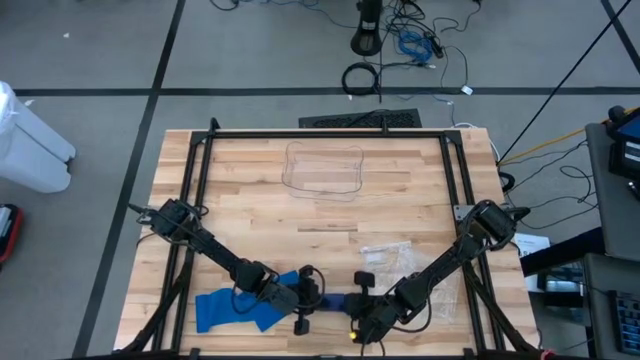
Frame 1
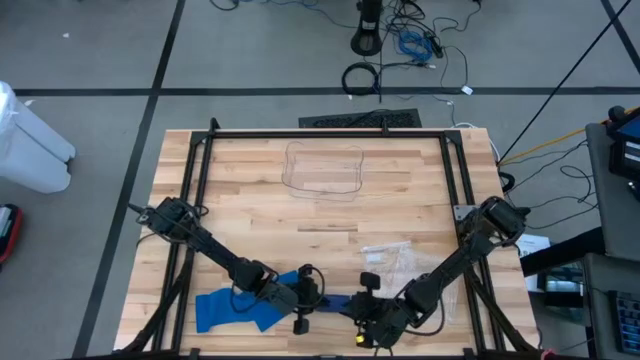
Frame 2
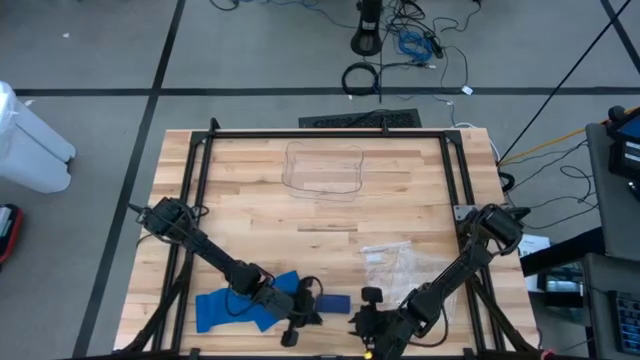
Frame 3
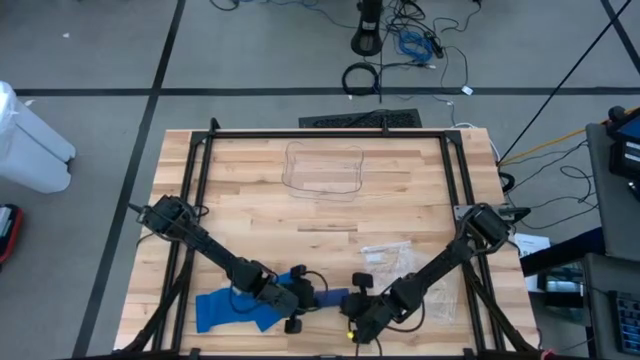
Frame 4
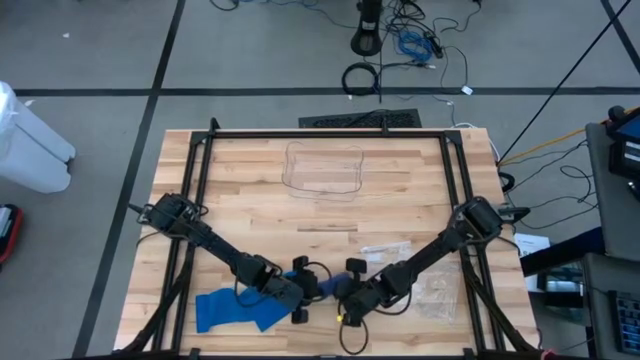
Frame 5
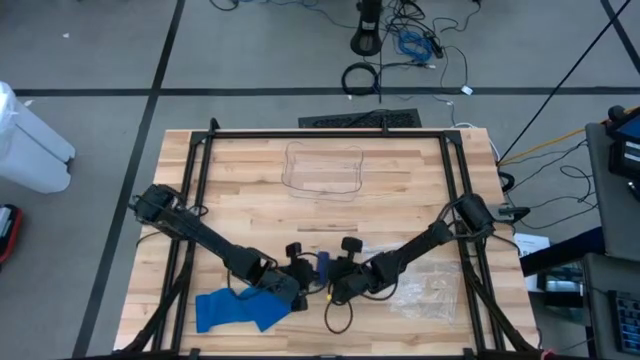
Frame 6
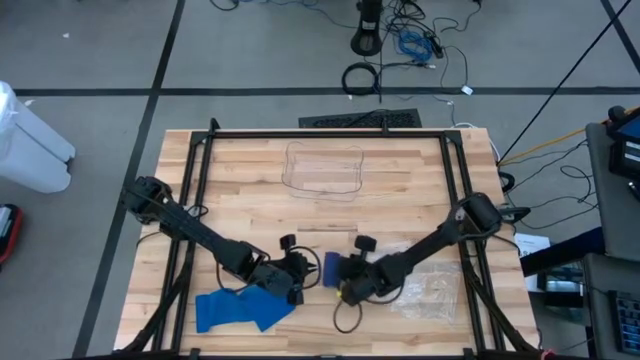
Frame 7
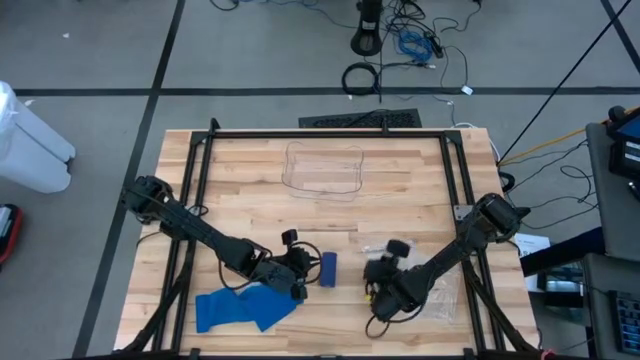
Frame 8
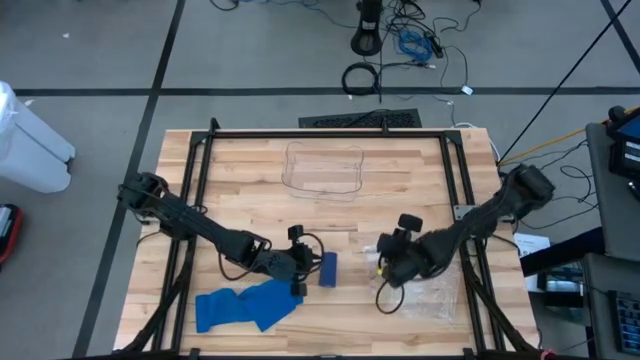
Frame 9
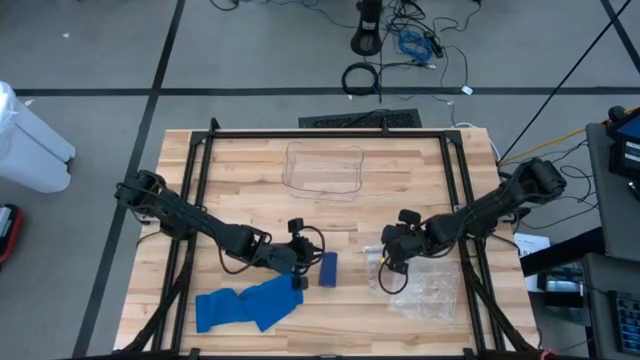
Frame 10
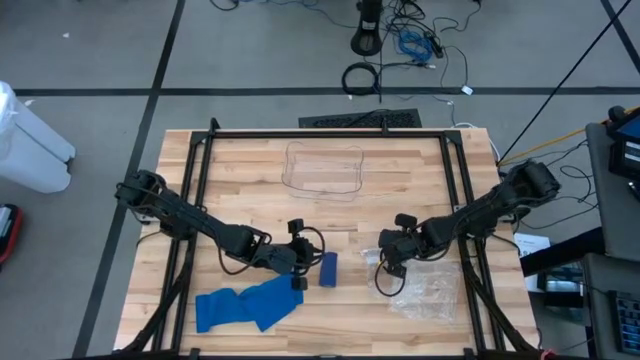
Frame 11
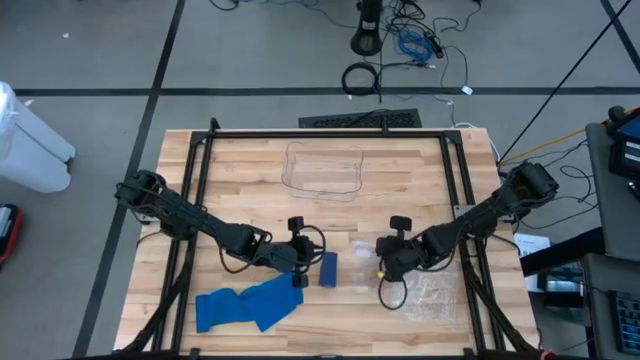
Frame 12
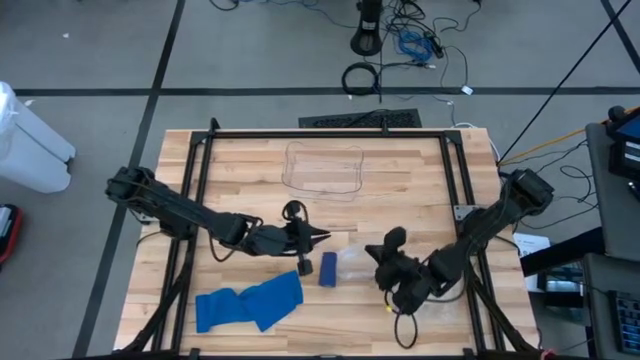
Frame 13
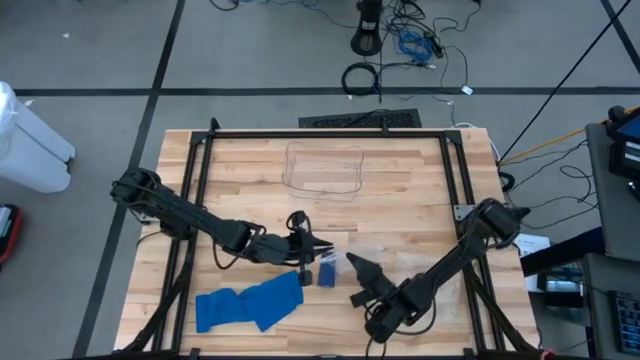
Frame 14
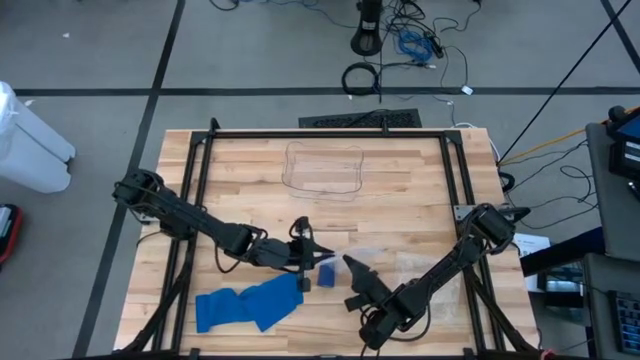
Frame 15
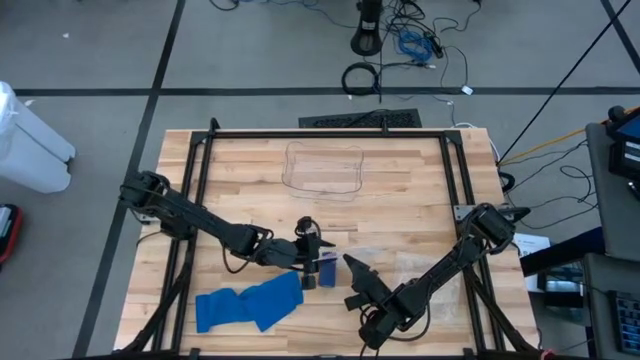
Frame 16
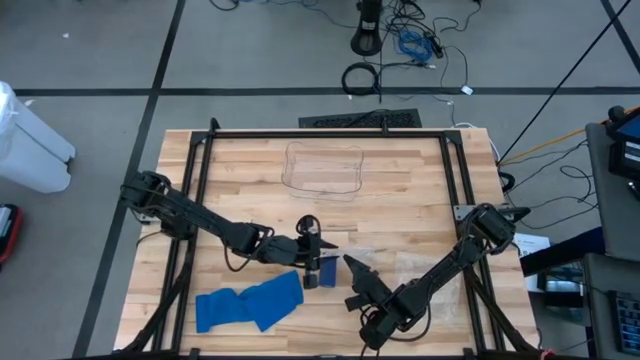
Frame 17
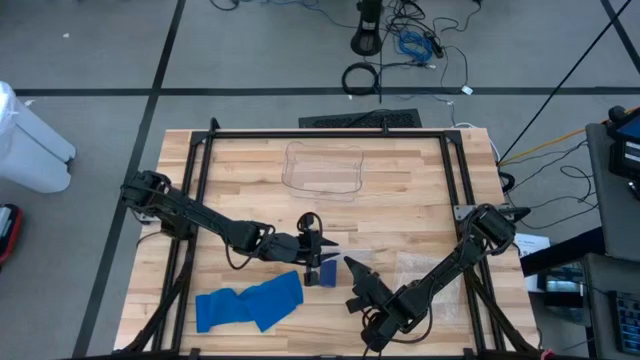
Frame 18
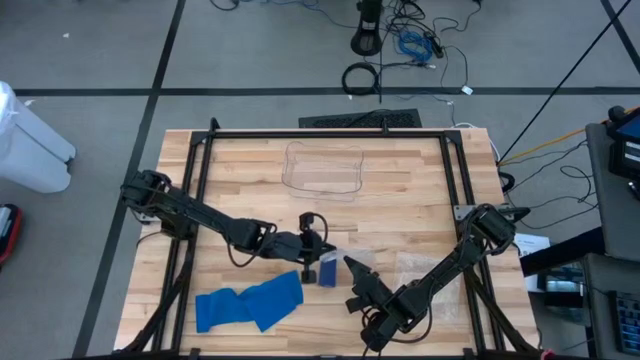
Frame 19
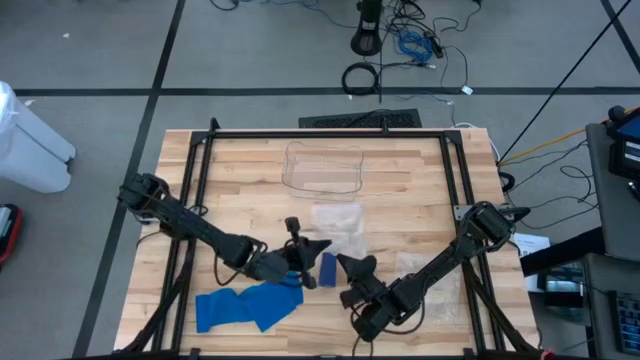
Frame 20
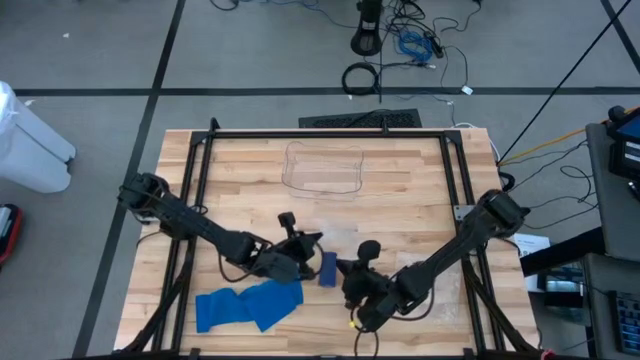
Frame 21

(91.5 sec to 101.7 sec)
Task: Roll bandage
Prepare the transparent zip bag

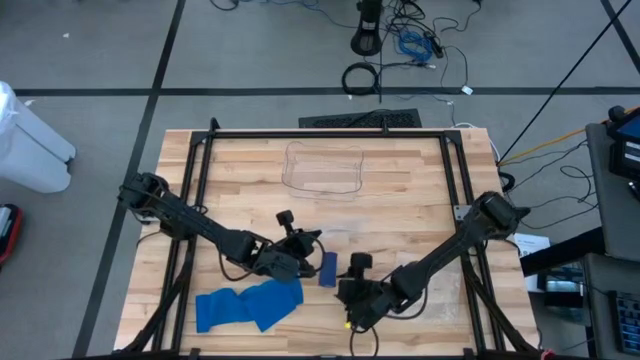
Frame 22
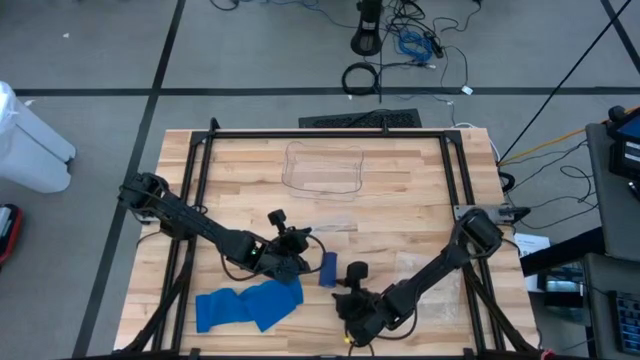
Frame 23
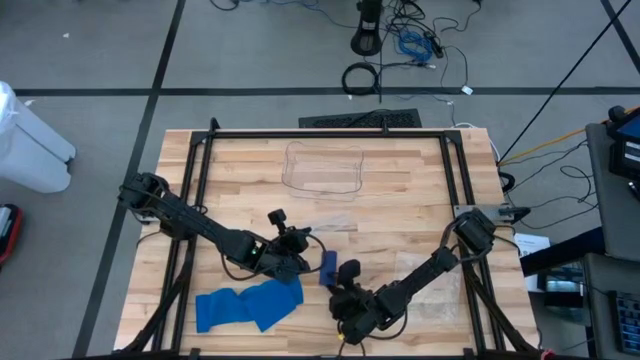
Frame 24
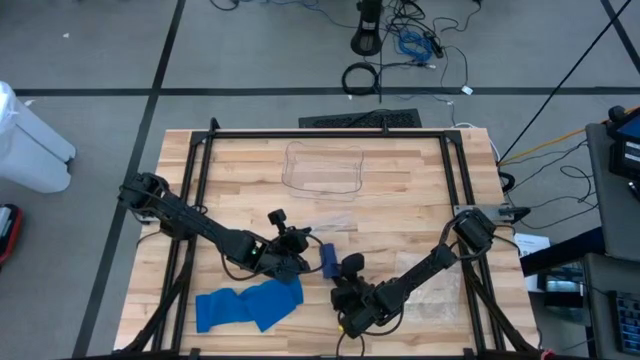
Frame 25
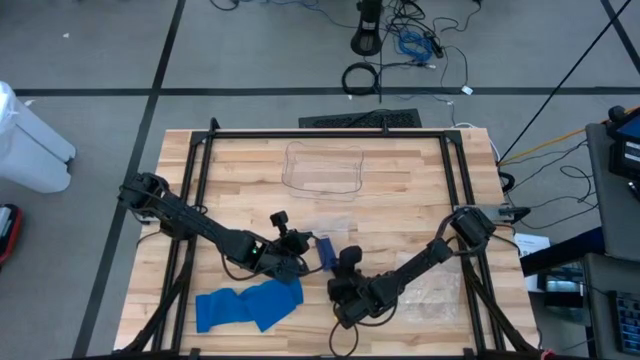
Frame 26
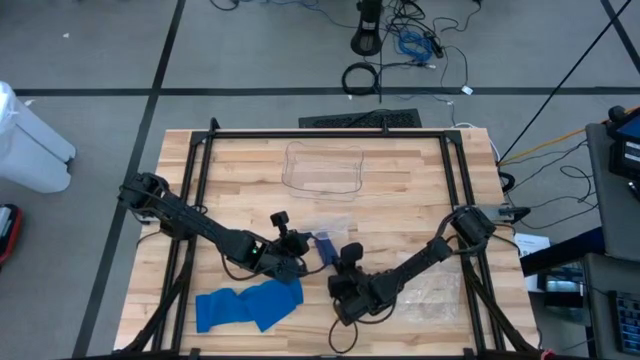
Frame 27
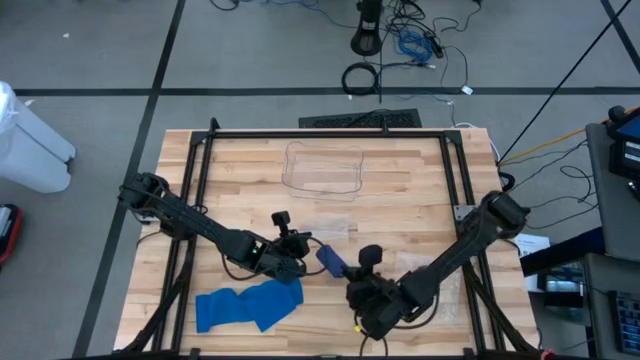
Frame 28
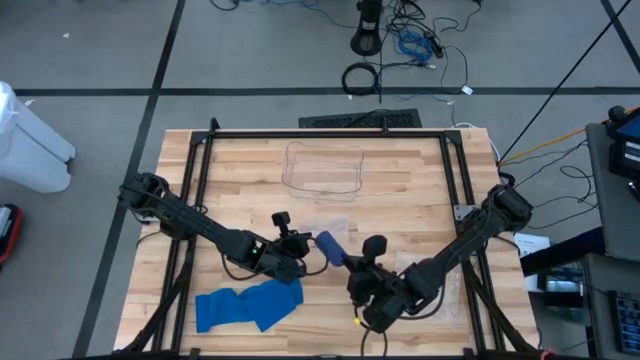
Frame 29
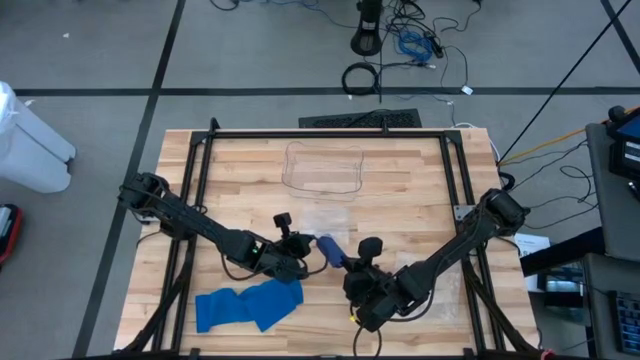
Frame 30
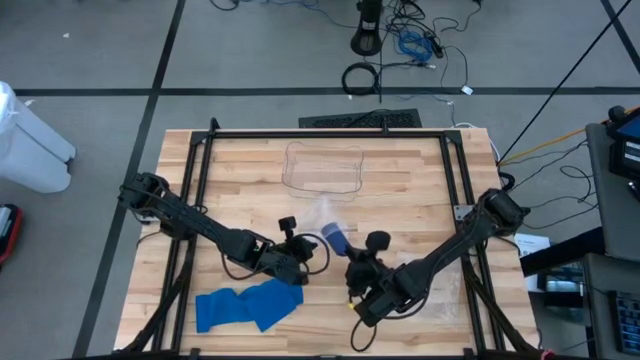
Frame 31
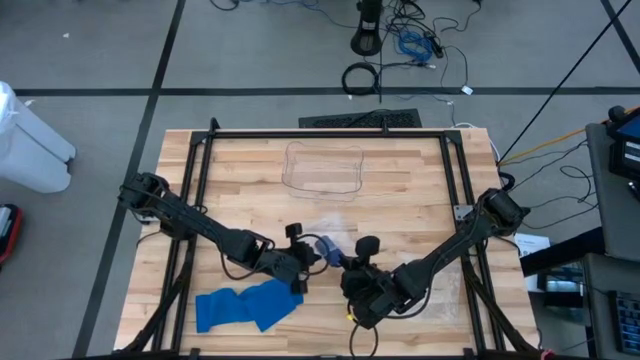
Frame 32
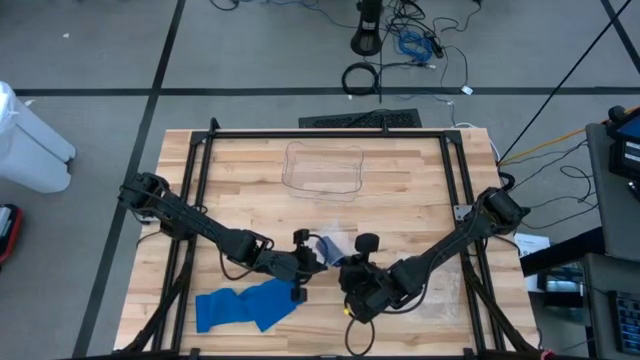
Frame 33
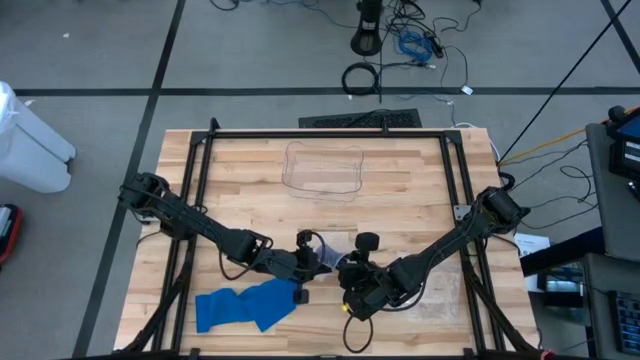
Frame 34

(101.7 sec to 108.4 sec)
Put the rolled purple bandage into the transparent zip bag

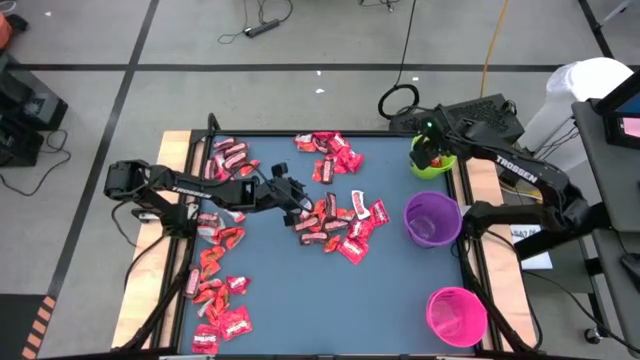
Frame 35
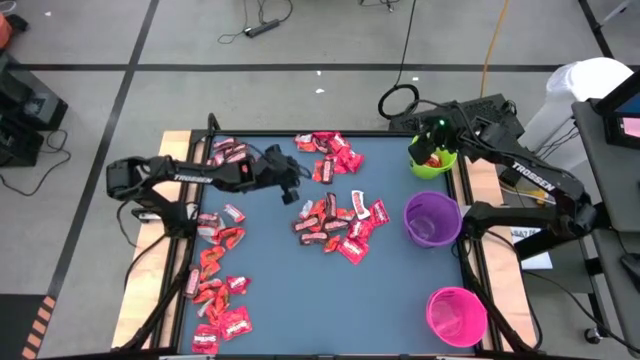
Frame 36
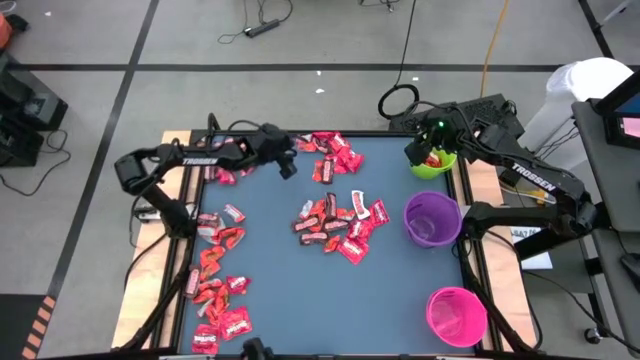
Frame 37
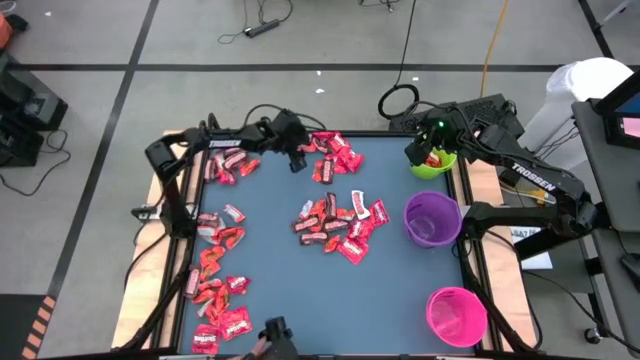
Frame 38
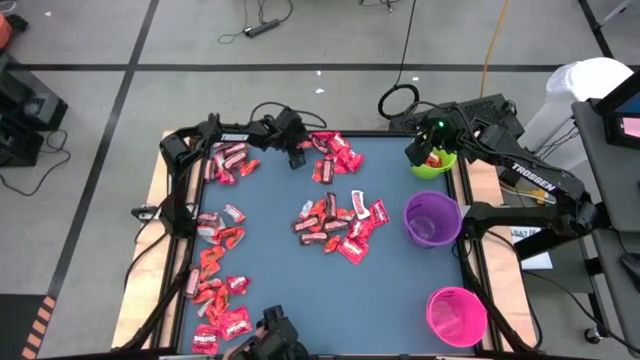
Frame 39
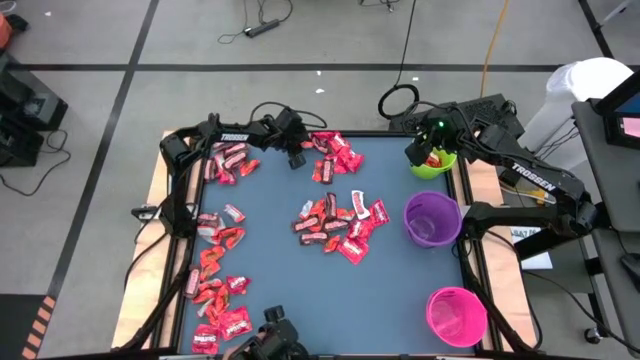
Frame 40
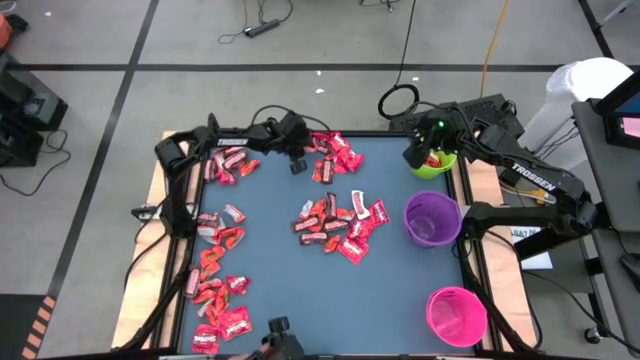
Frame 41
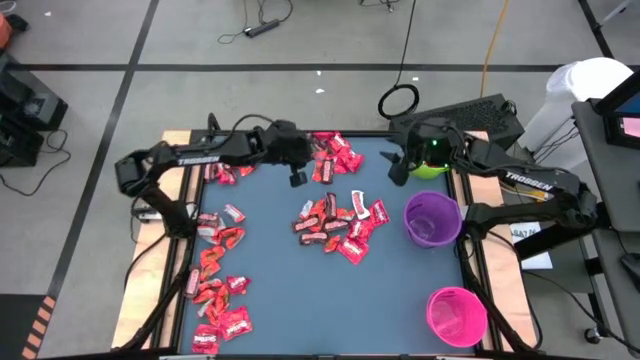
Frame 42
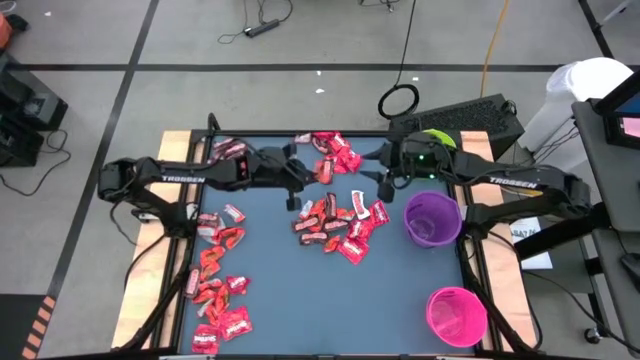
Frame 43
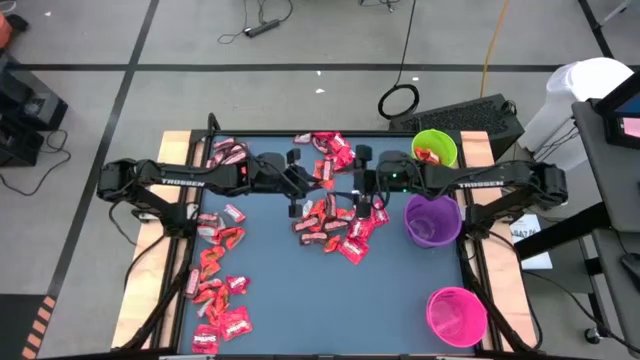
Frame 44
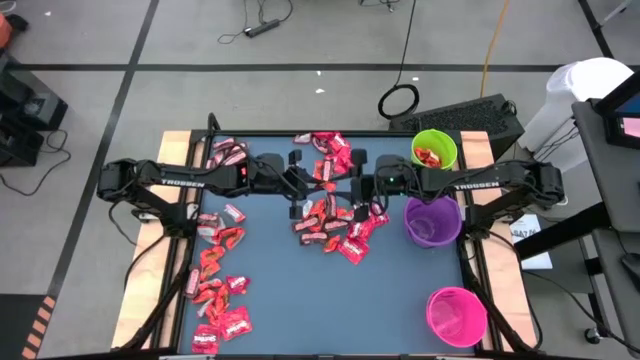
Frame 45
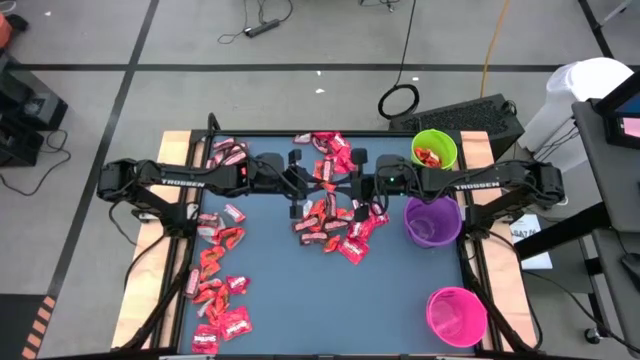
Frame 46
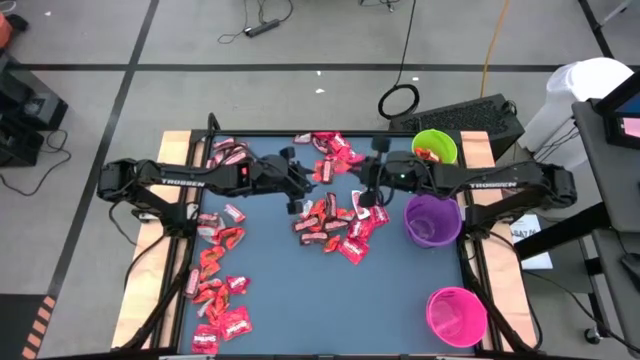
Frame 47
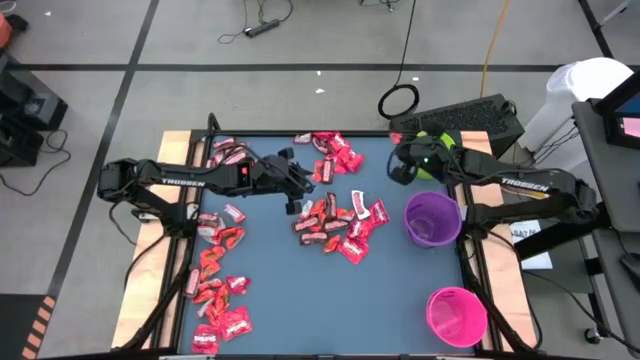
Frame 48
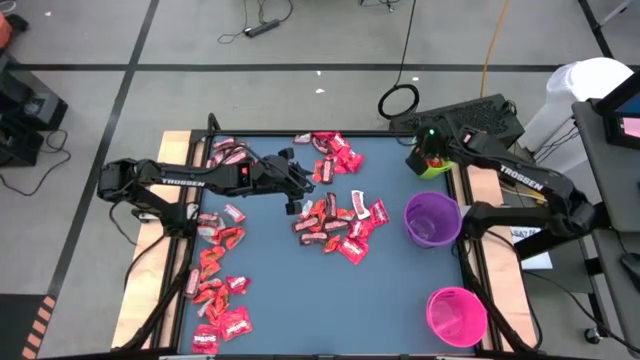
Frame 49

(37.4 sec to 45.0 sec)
Task: Organize candy in baskets
Put the orange chocolate bar into the green bucket
